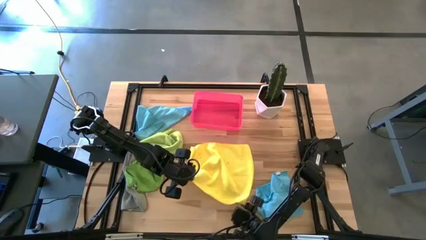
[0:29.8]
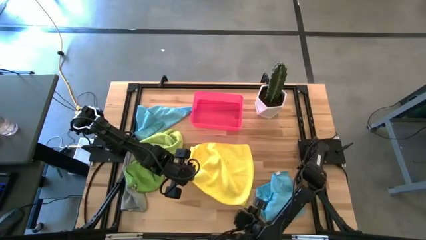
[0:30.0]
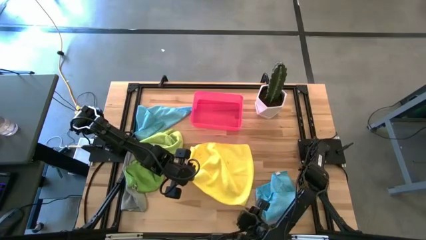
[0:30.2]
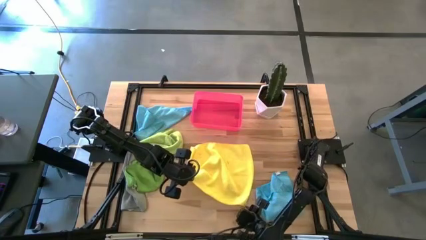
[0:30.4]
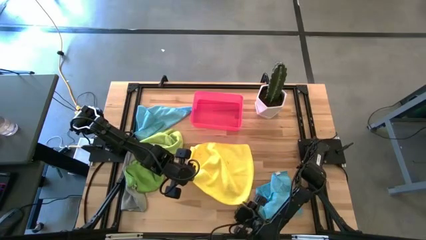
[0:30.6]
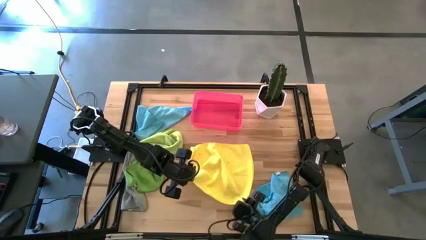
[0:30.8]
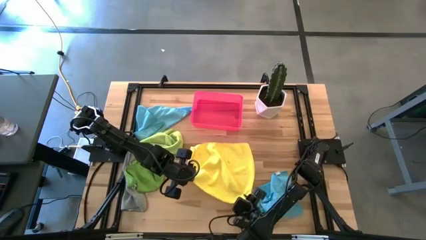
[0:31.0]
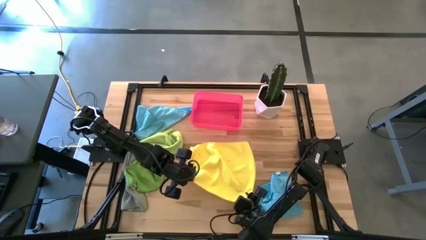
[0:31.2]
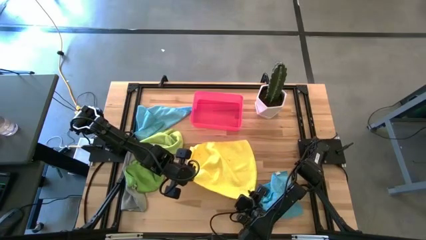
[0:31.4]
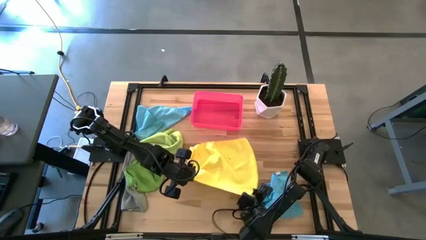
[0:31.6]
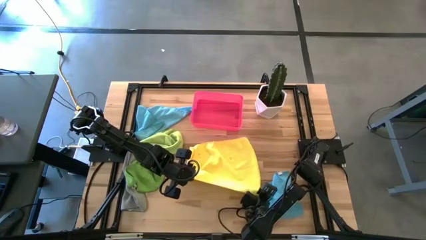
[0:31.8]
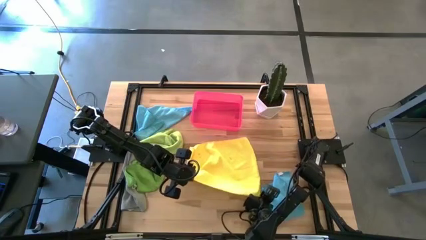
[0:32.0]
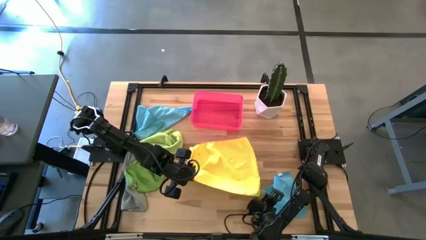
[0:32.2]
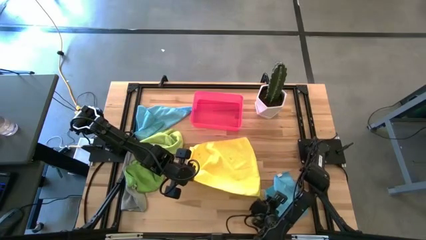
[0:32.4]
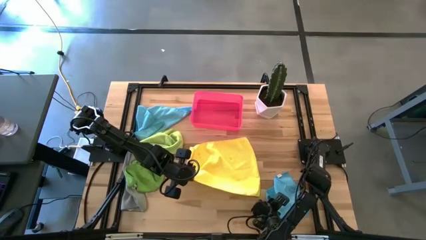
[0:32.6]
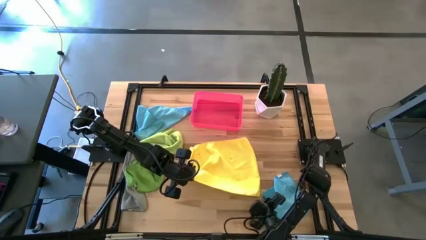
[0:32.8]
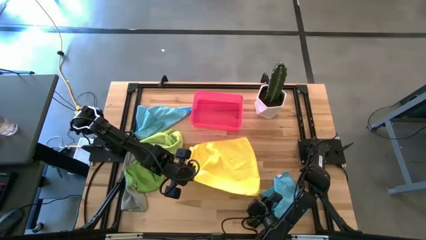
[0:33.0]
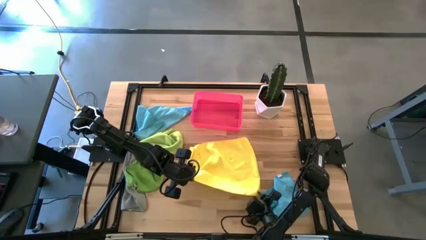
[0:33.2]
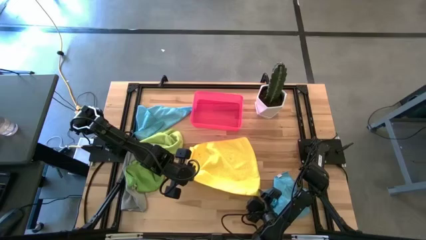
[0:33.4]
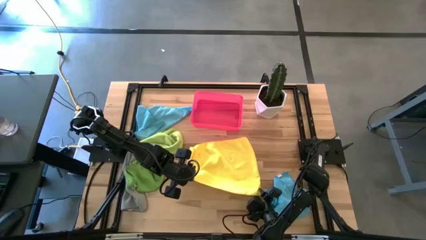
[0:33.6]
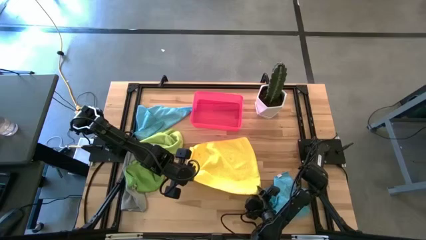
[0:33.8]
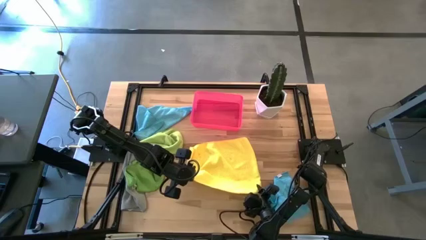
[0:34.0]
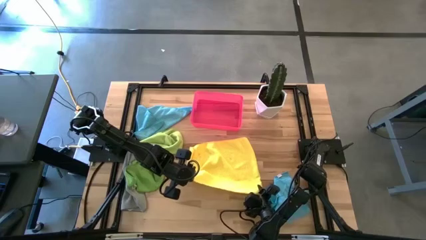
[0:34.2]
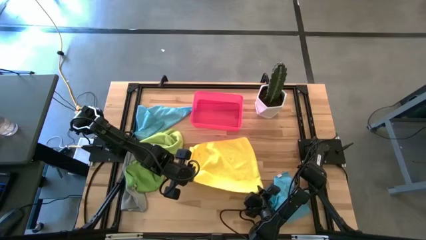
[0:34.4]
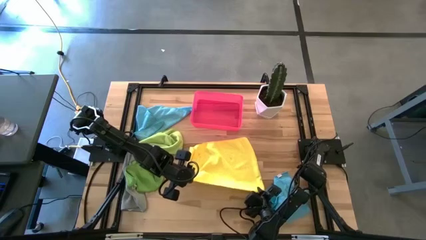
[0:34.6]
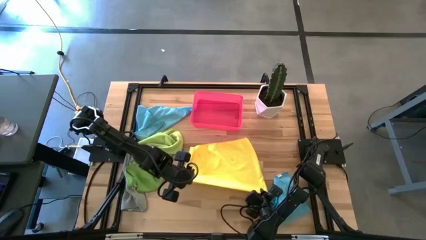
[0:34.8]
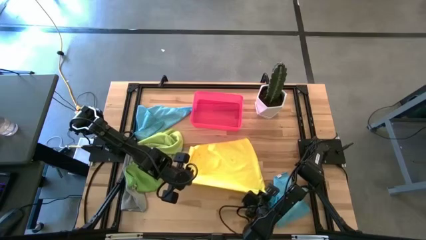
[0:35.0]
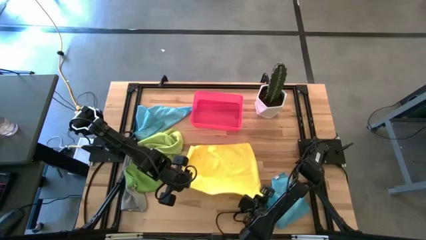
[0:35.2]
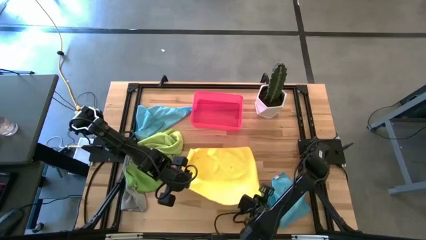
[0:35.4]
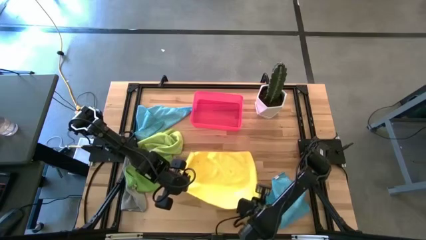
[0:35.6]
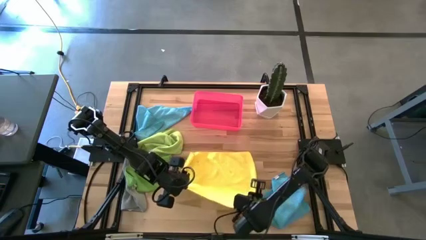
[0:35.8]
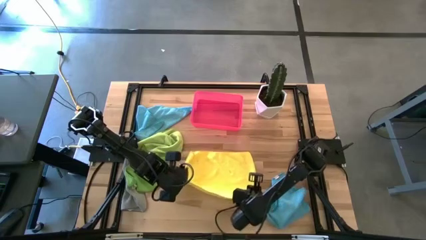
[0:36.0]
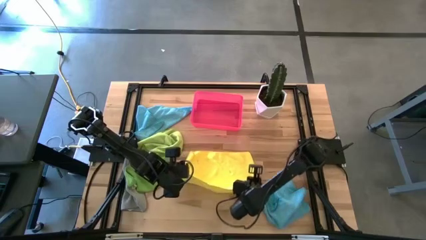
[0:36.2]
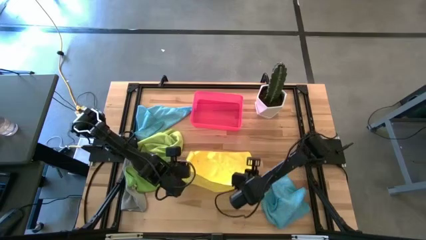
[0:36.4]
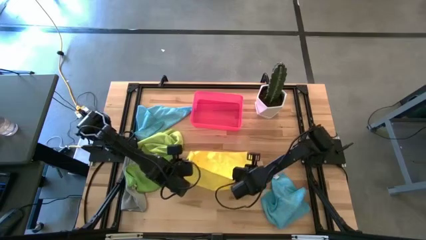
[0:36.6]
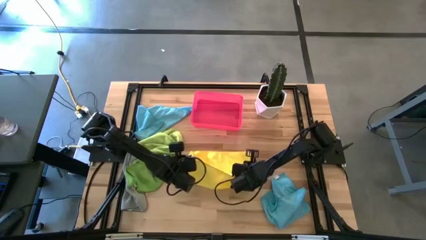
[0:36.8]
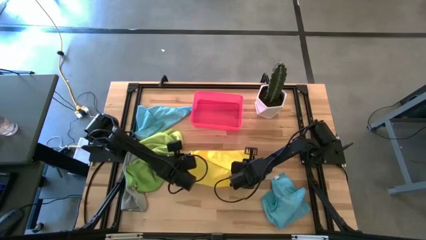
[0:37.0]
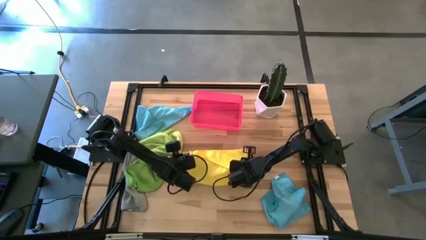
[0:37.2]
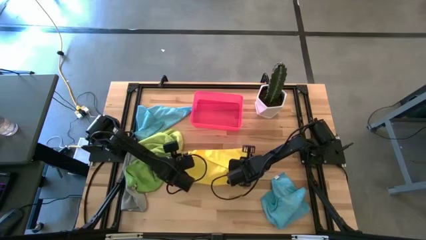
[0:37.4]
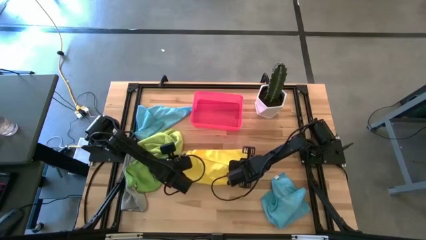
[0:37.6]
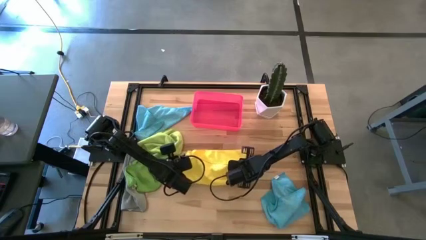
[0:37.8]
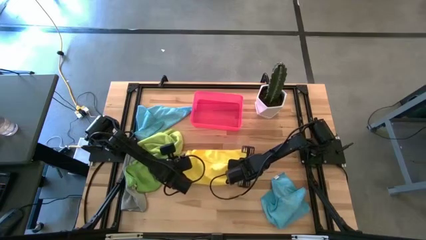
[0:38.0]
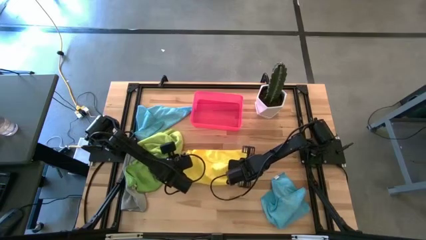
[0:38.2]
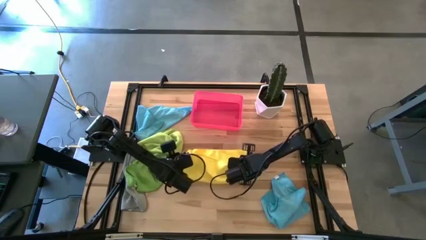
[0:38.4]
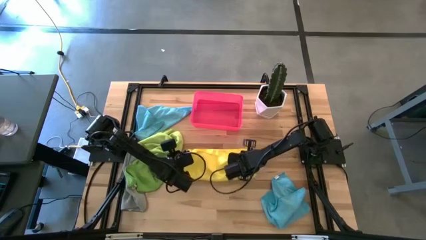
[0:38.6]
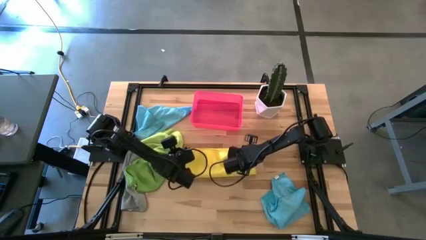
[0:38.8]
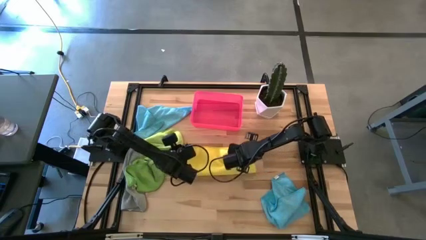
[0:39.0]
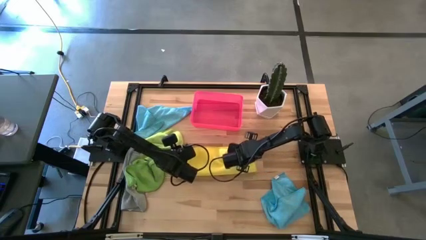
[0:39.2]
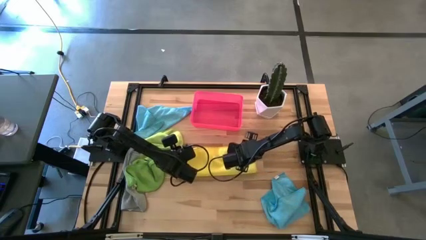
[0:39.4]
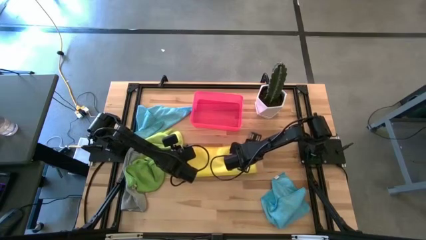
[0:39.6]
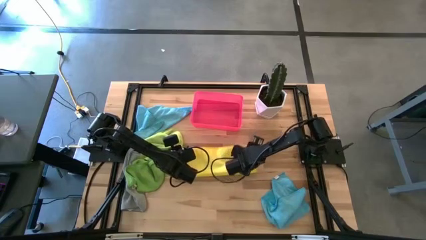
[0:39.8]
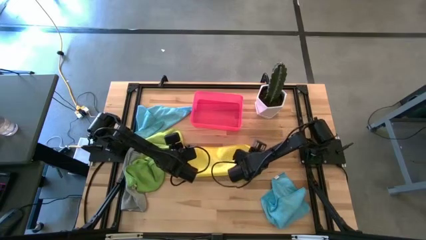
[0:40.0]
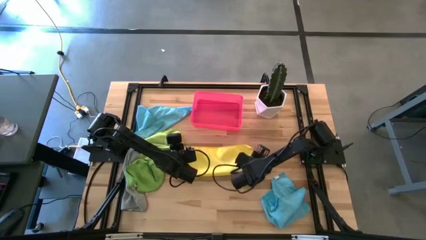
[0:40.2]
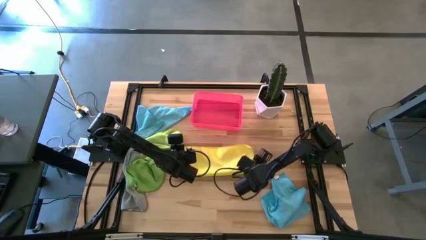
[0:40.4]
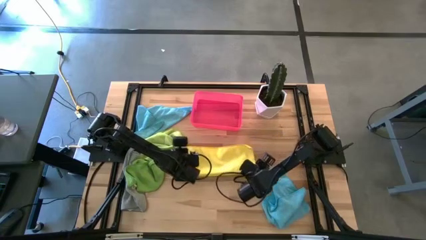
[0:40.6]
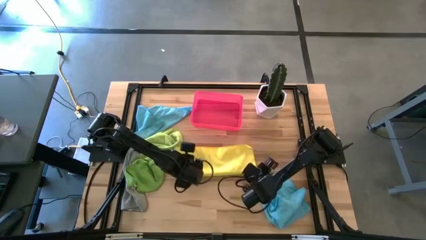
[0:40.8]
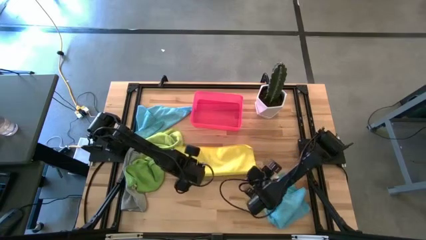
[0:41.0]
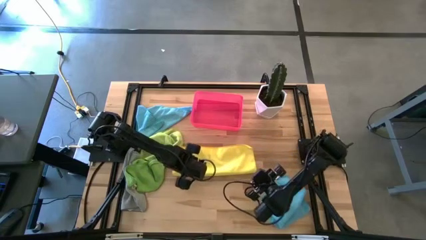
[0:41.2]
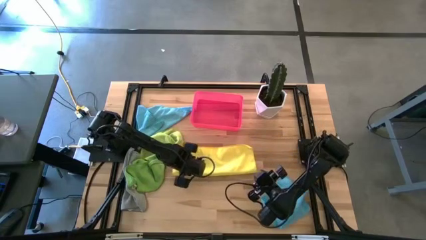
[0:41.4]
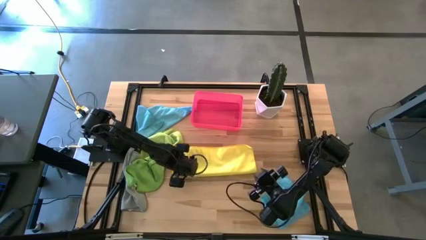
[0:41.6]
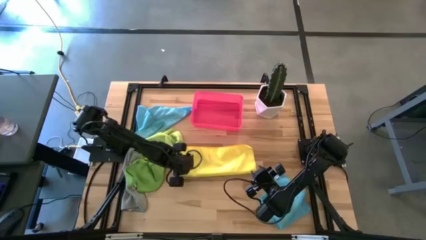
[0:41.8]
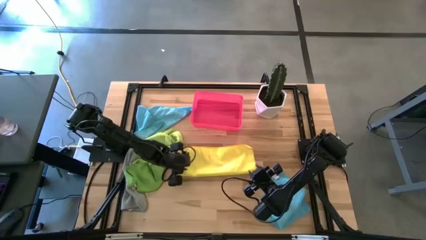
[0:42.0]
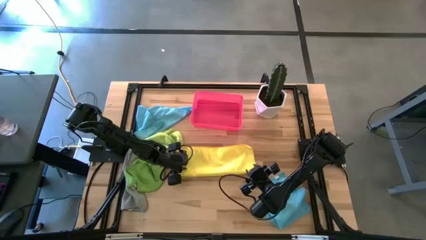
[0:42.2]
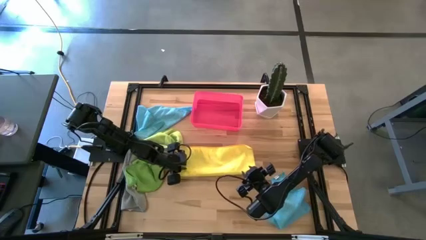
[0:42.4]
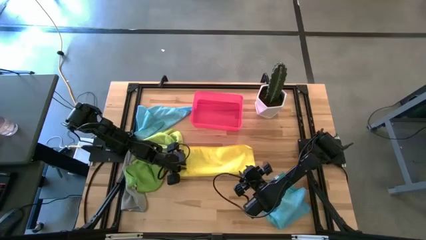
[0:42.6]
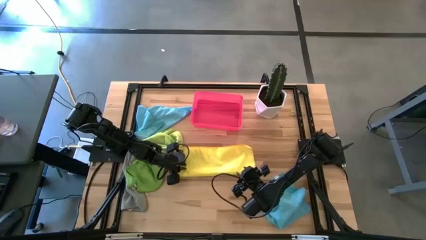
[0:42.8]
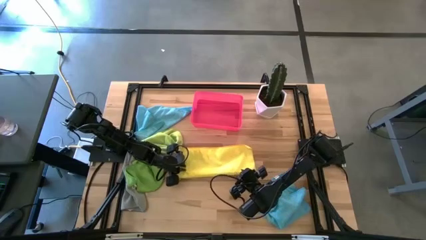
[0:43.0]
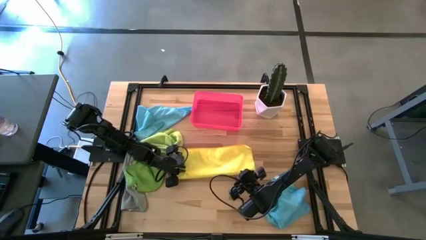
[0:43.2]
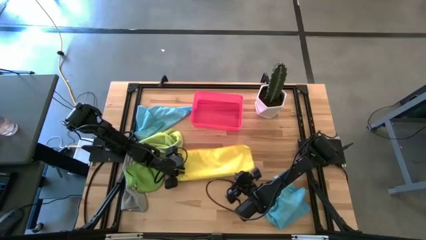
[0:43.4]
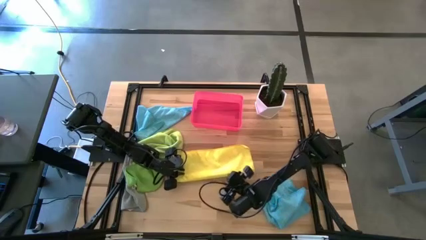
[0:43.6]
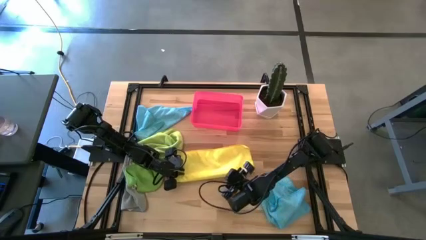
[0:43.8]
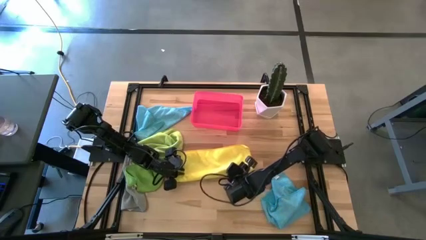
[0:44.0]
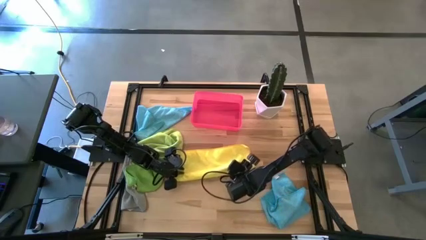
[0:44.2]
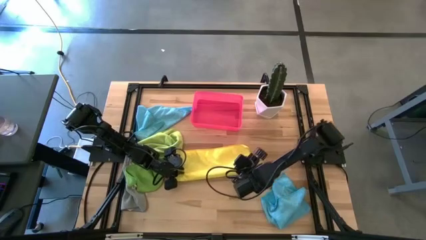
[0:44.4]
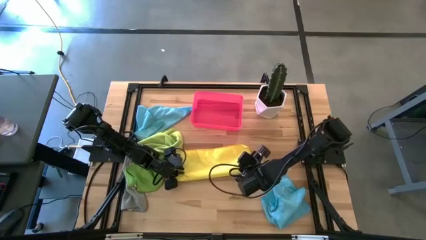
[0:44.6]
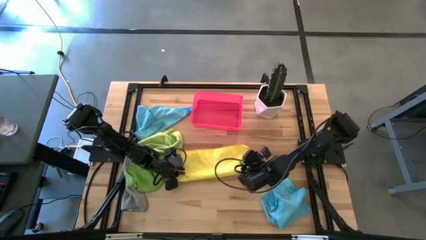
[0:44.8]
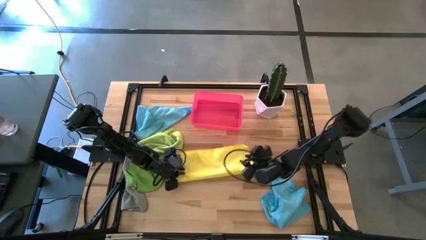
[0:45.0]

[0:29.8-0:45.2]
Task: Fold microfiber towels
Fold the yellow microfiber cloth on the table

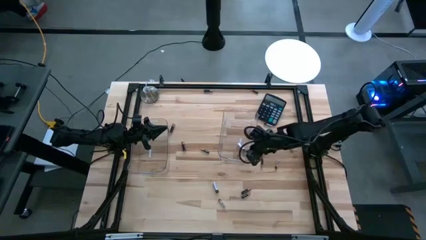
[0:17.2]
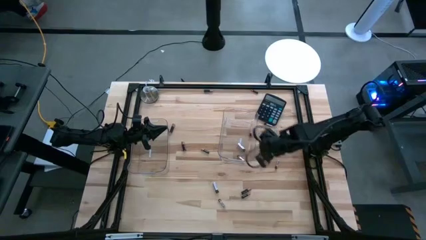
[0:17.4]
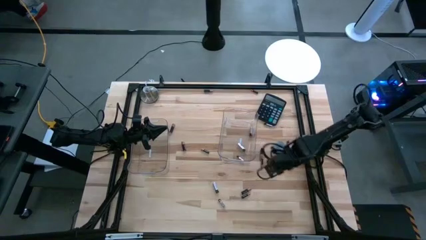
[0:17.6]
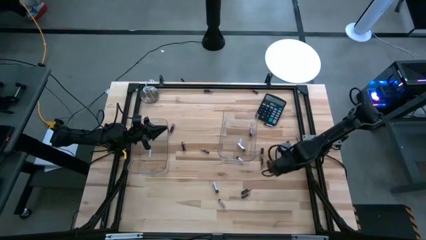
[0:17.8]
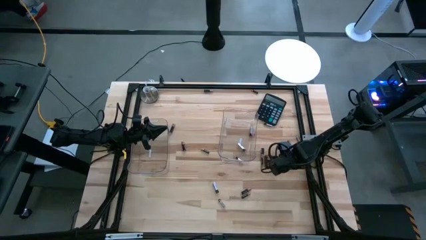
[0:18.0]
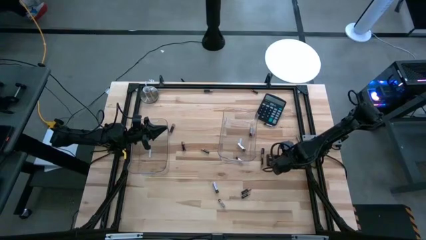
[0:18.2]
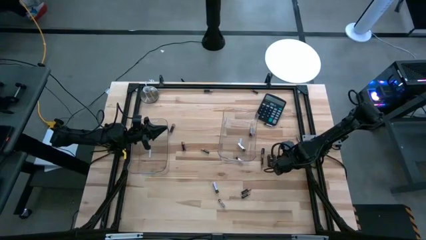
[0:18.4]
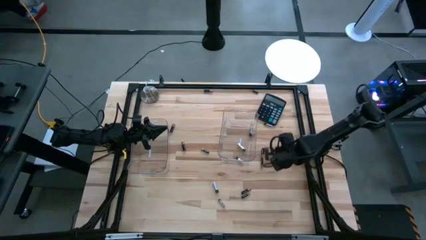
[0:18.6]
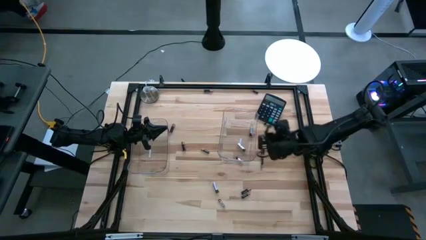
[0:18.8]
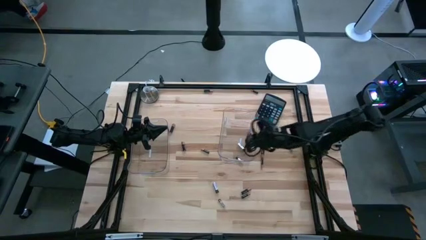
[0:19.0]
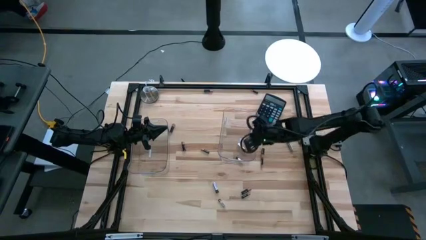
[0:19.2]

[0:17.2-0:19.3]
Task: Sort batteries
Put the silver battery into the right transparent bin
